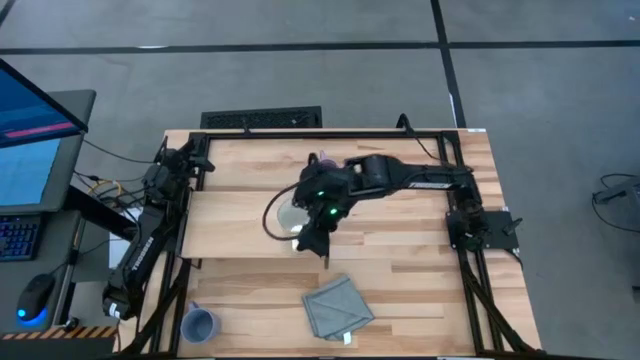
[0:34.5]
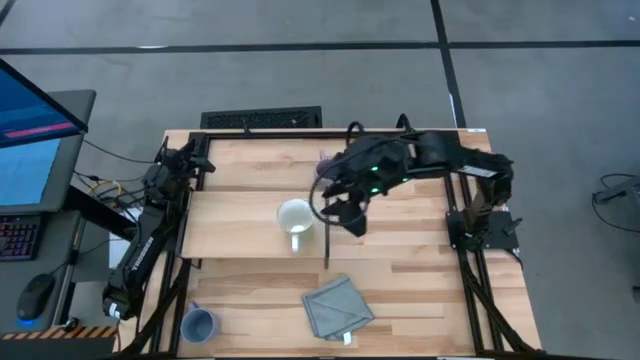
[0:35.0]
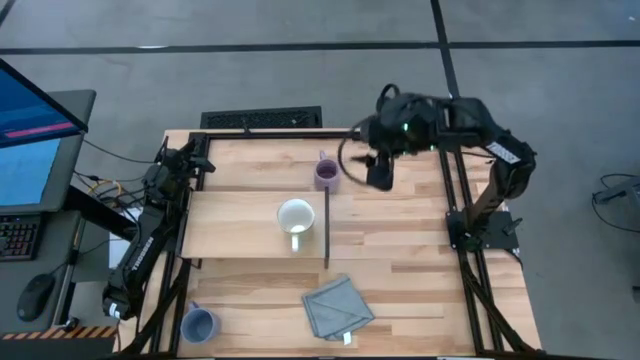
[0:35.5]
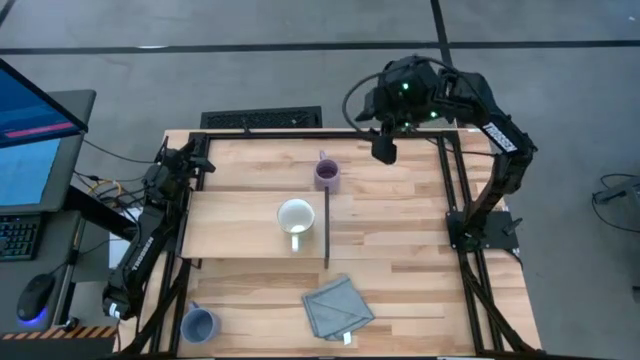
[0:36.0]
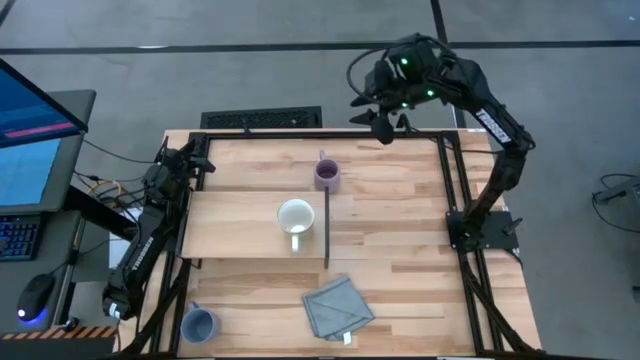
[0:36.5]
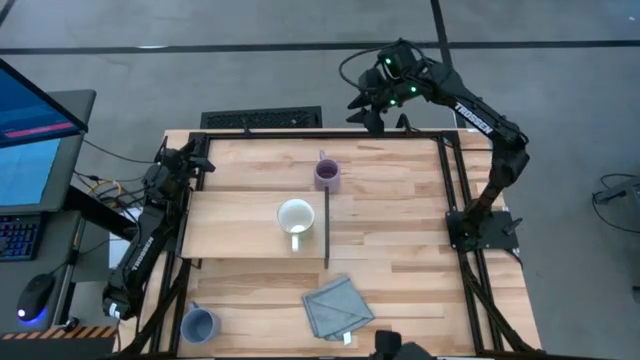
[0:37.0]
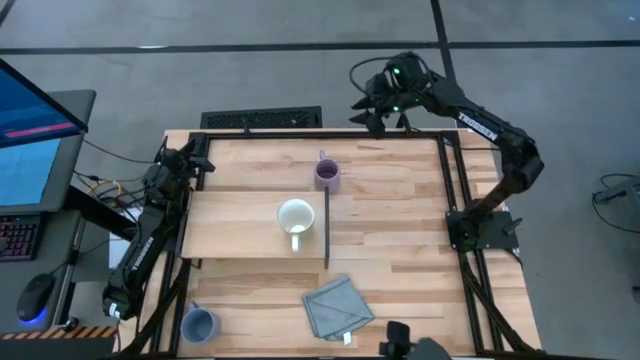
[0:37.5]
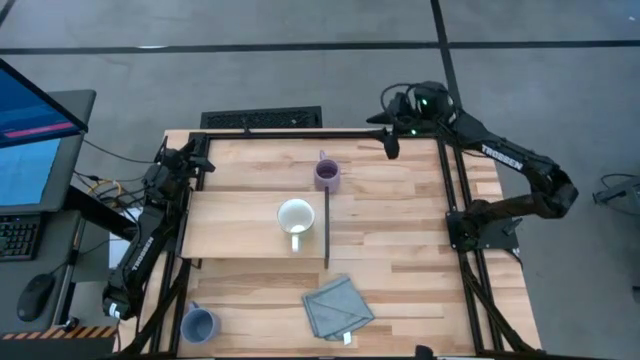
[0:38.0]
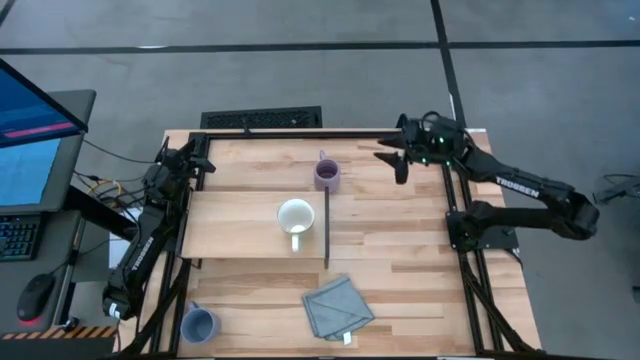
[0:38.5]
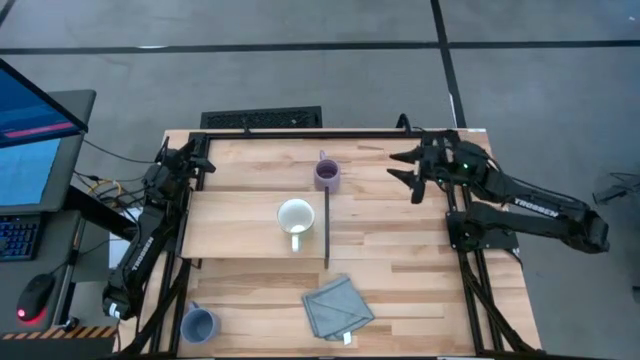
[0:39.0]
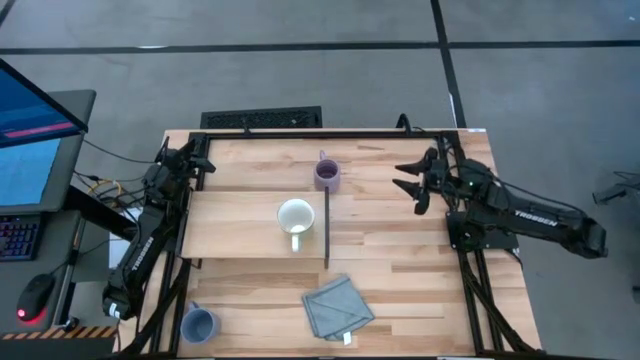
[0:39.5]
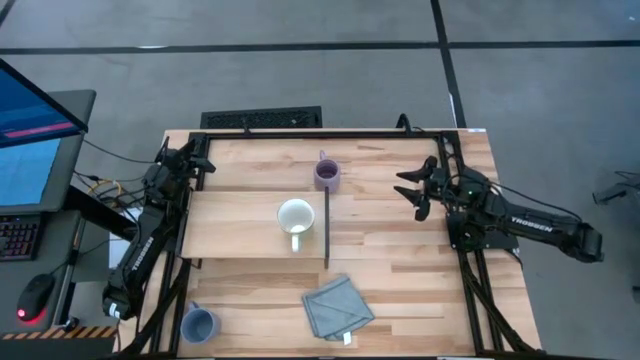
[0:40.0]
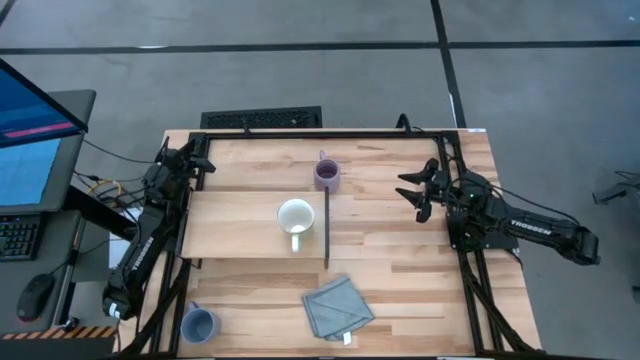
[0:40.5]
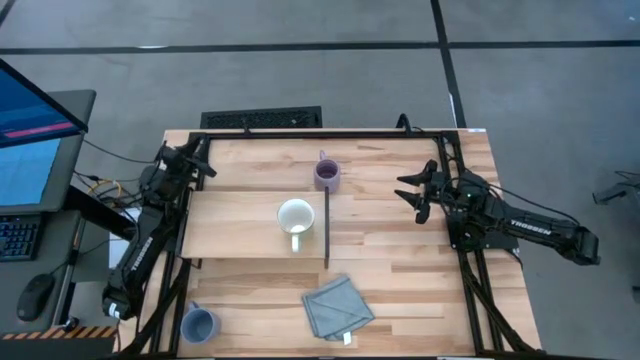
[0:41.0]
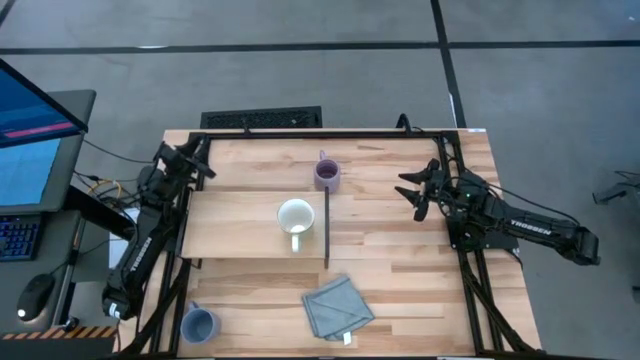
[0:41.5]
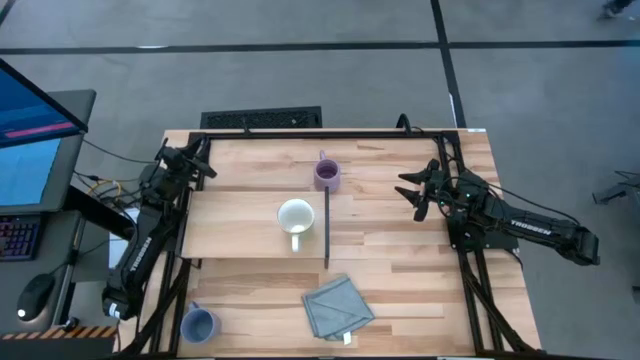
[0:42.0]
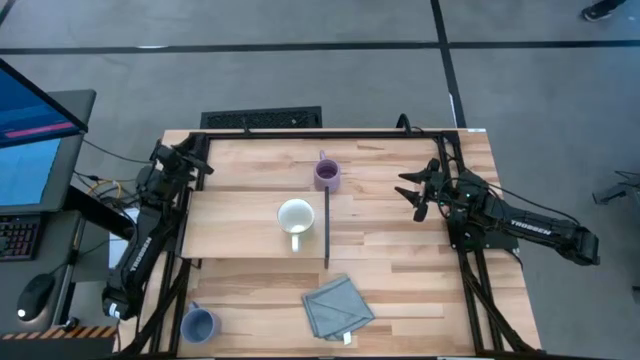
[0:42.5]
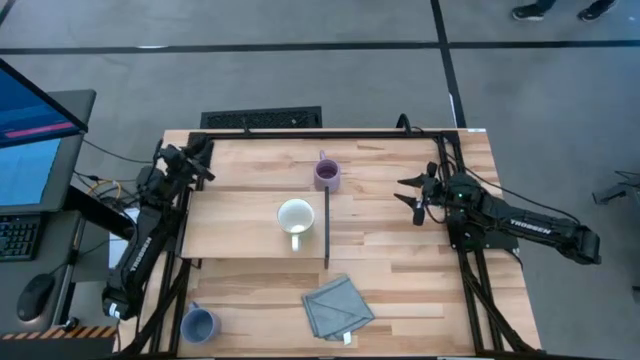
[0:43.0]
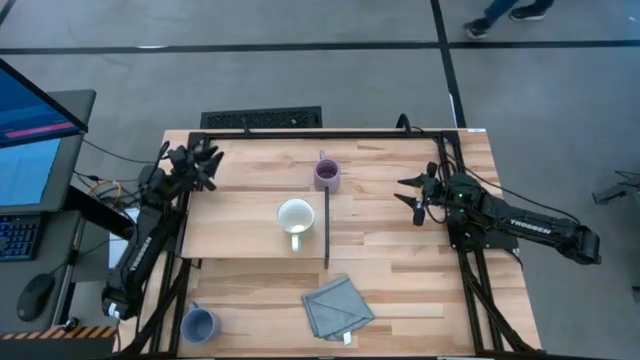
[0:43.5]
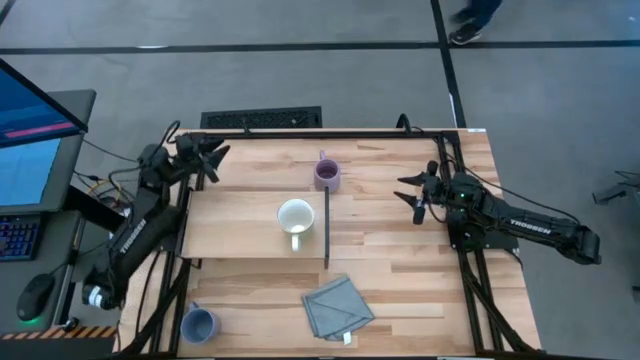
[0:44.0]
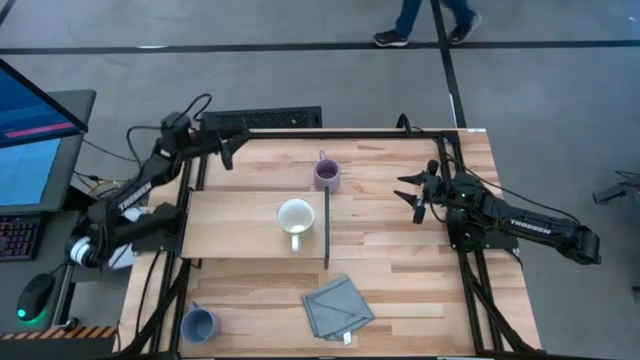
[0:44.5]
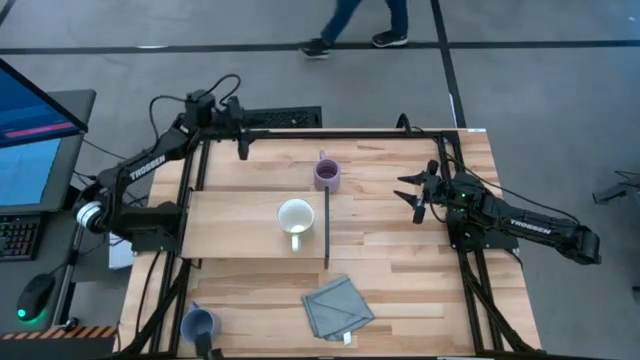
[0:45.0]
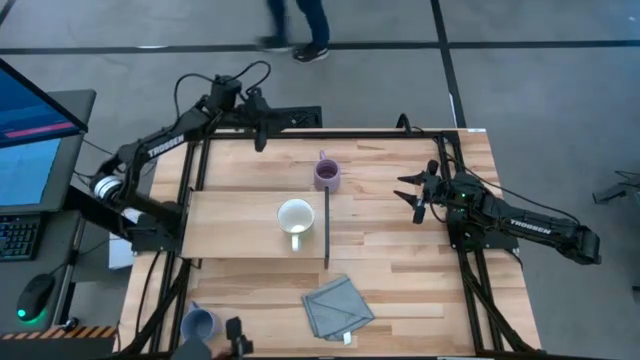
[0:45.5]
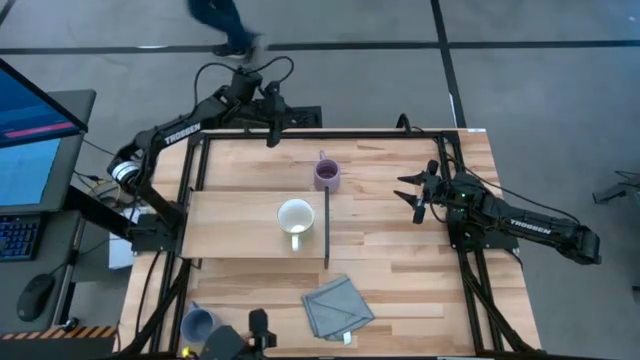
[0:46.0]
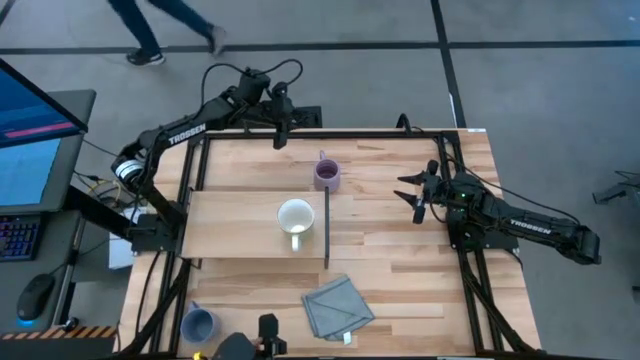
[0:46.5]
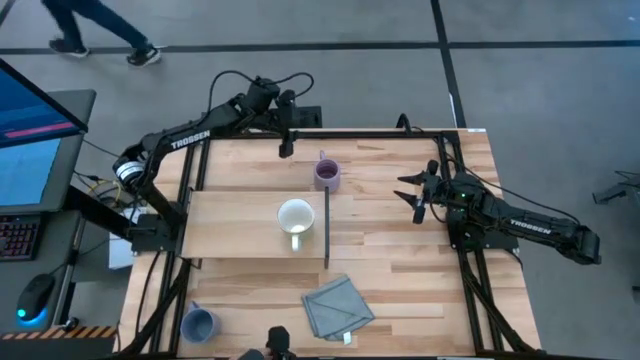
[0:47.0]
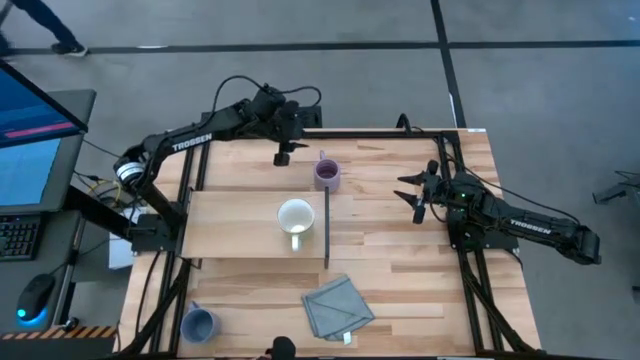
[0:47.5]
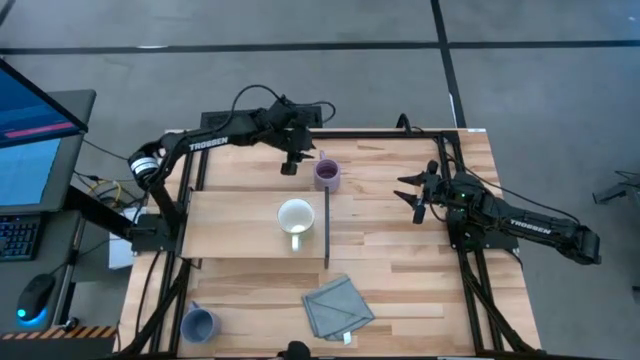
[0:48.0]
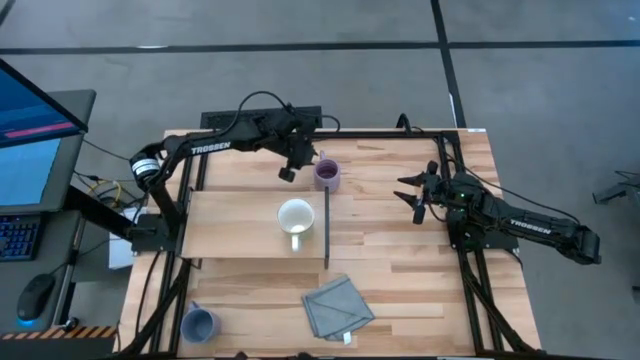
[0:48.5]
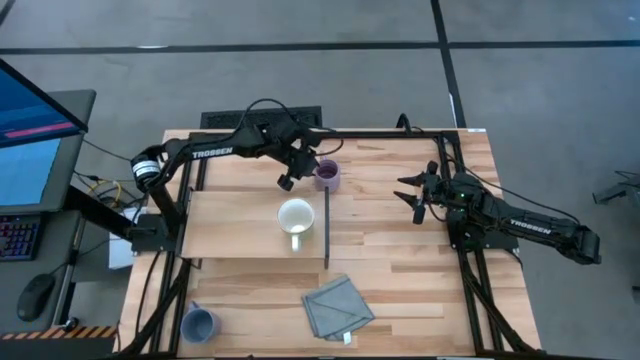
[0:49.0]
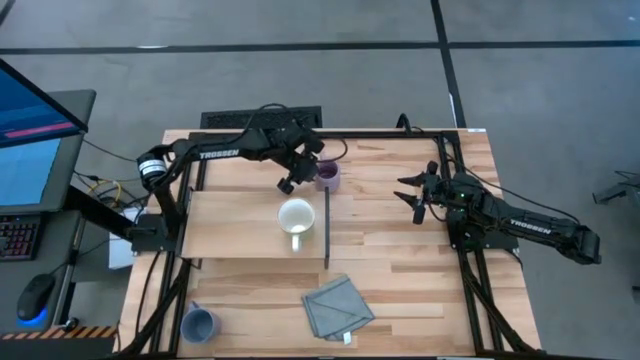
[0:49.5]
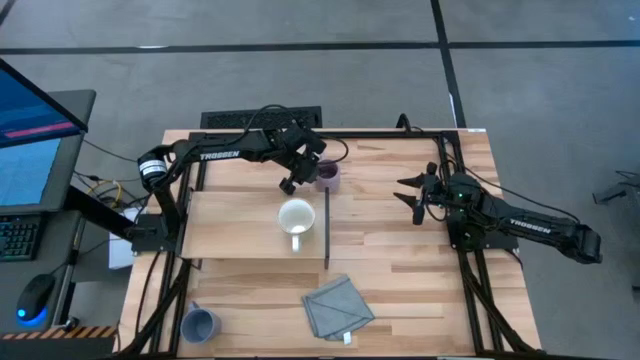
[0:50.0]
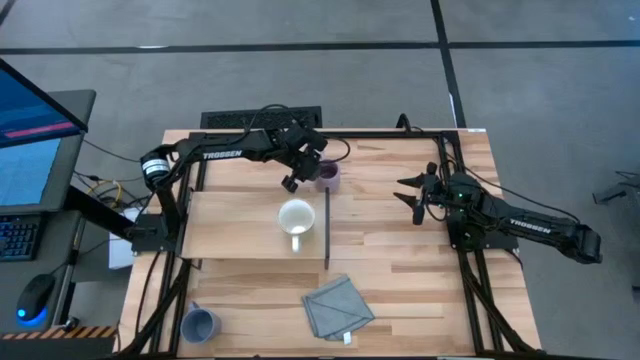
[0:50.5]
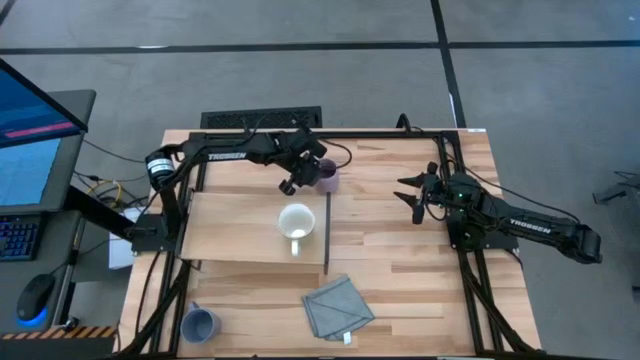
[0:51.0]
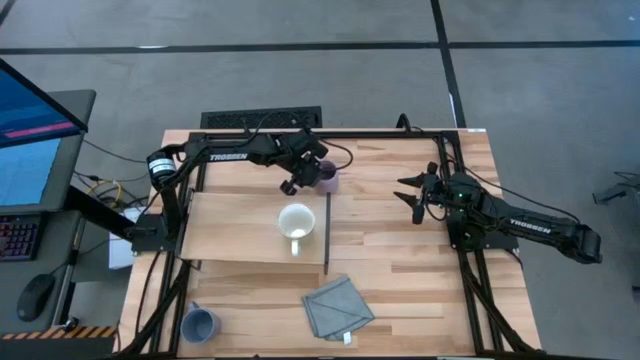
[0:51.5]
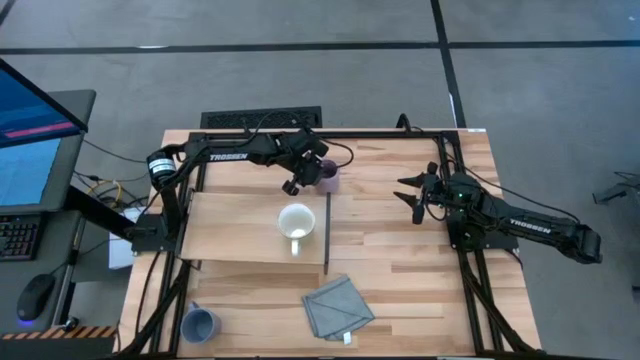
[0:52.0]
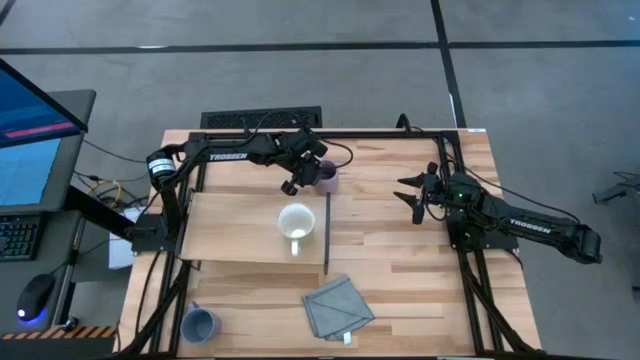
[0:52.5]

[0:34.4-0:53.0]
Task: Stack small to large cups/mugs on shelf
Put the purple mug on the shelf
